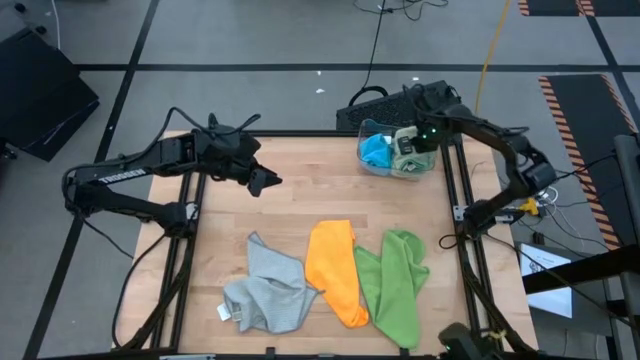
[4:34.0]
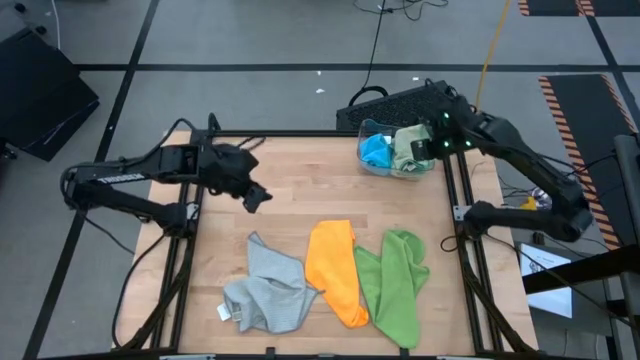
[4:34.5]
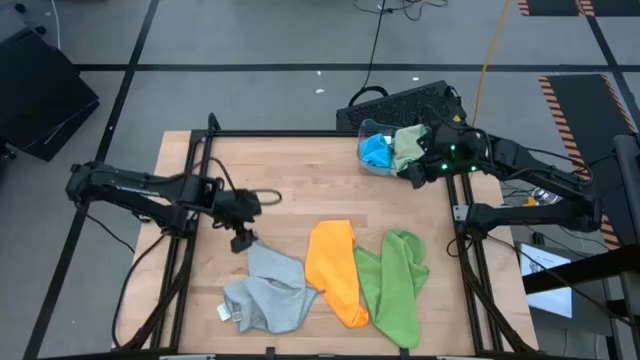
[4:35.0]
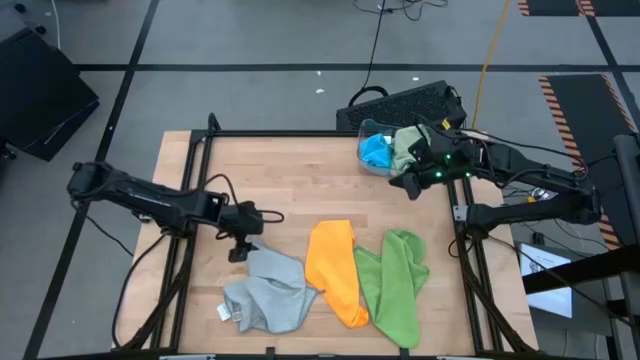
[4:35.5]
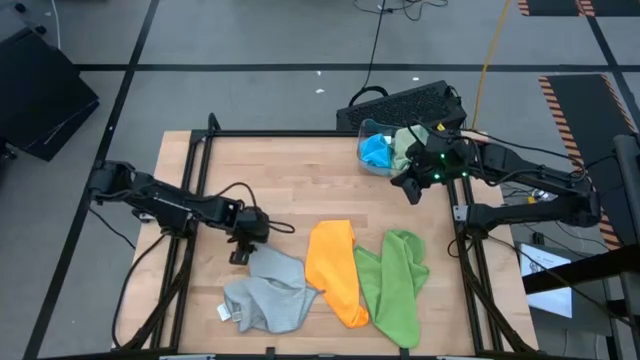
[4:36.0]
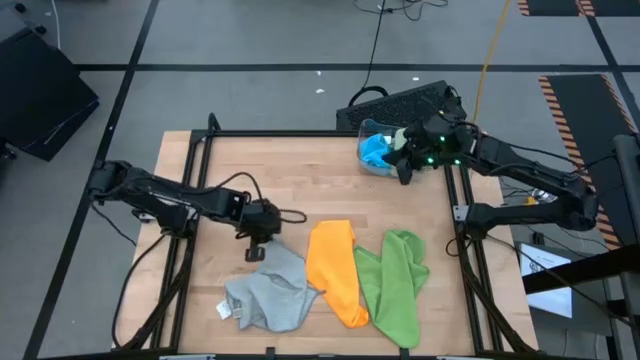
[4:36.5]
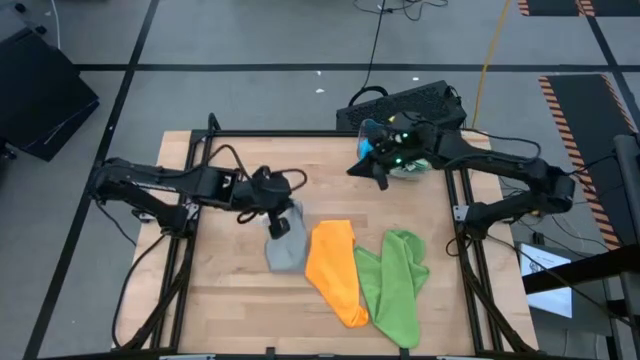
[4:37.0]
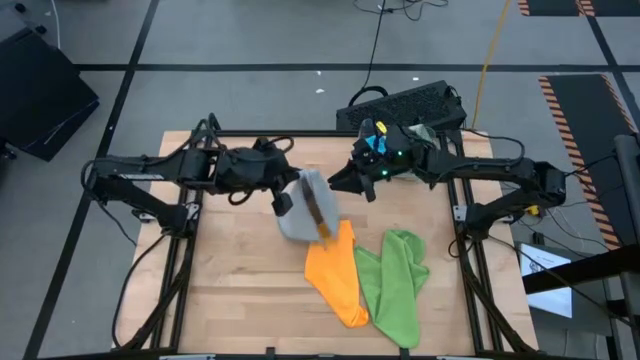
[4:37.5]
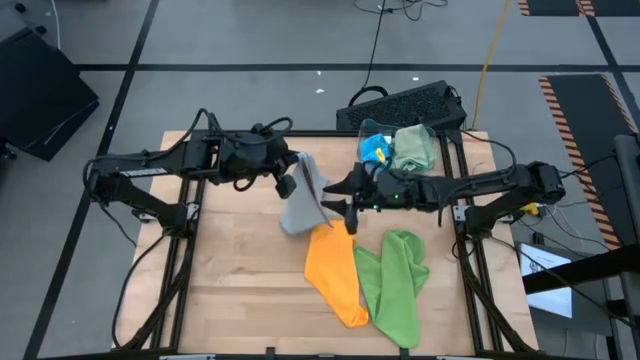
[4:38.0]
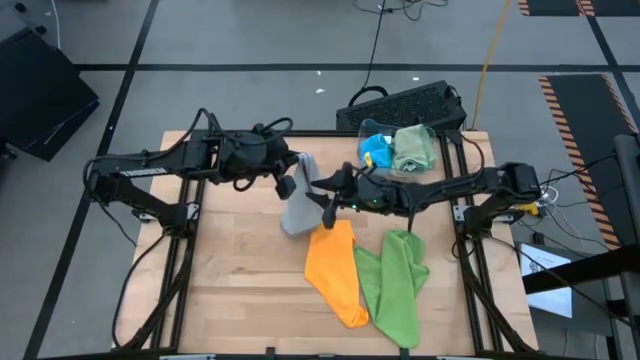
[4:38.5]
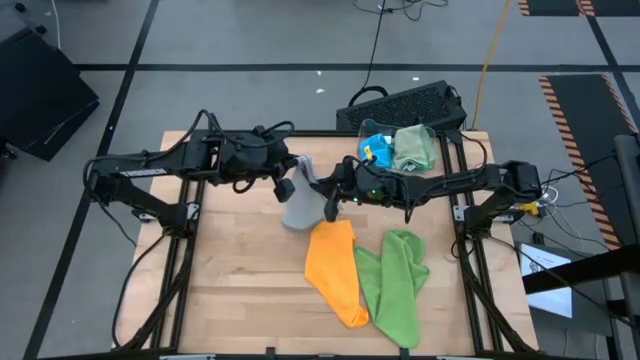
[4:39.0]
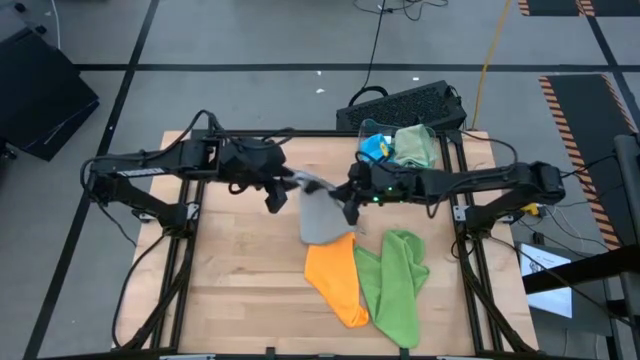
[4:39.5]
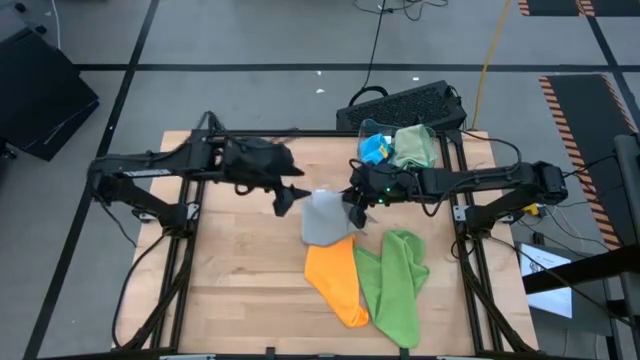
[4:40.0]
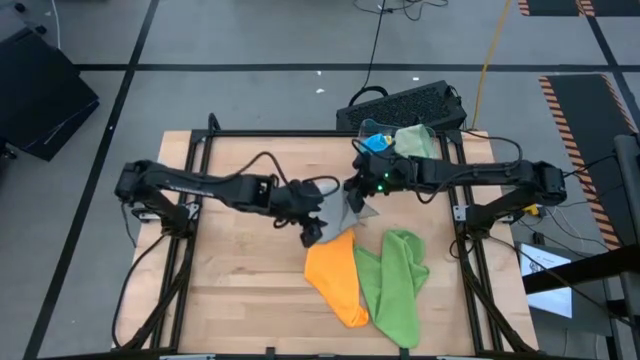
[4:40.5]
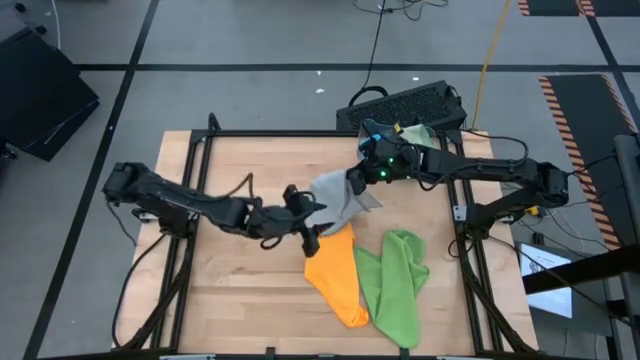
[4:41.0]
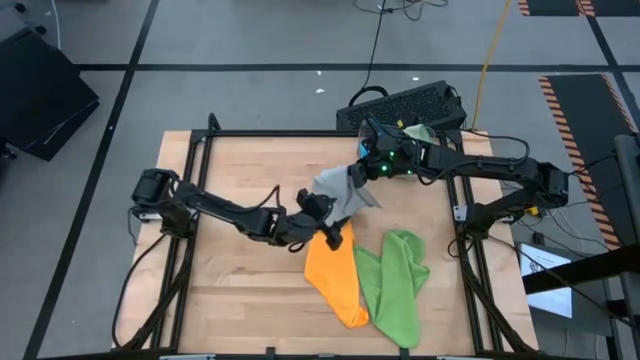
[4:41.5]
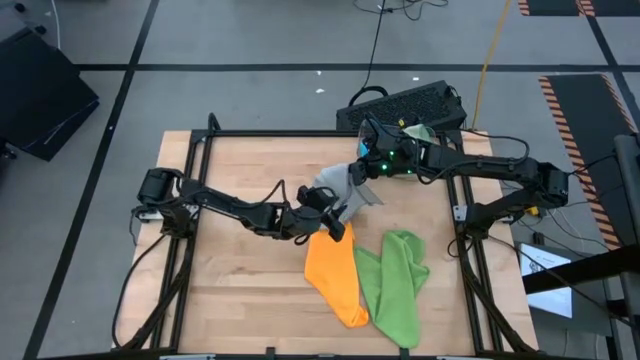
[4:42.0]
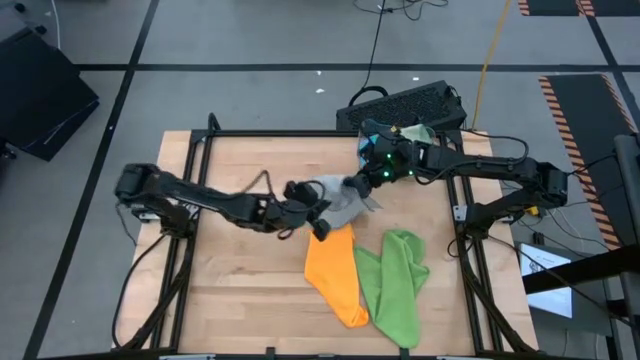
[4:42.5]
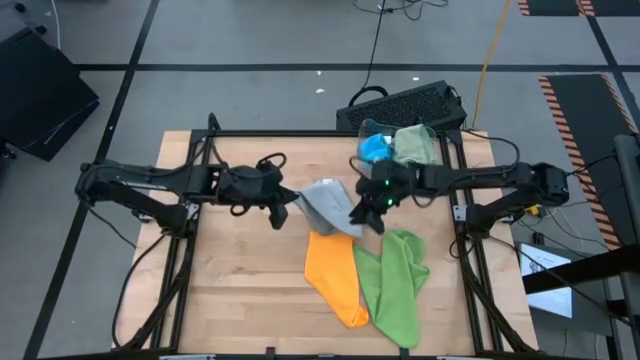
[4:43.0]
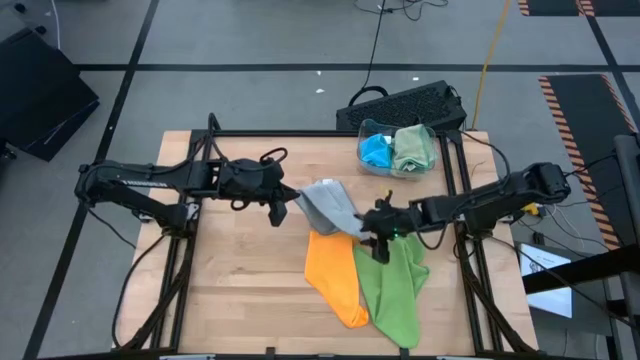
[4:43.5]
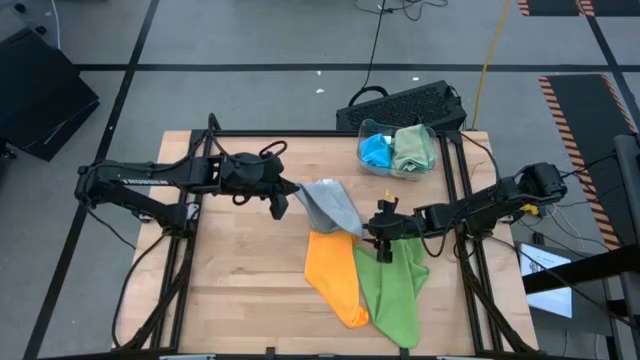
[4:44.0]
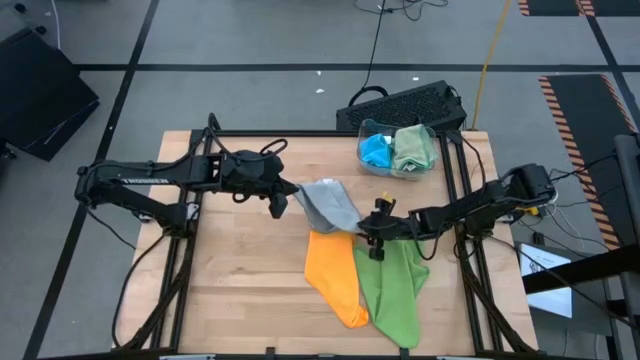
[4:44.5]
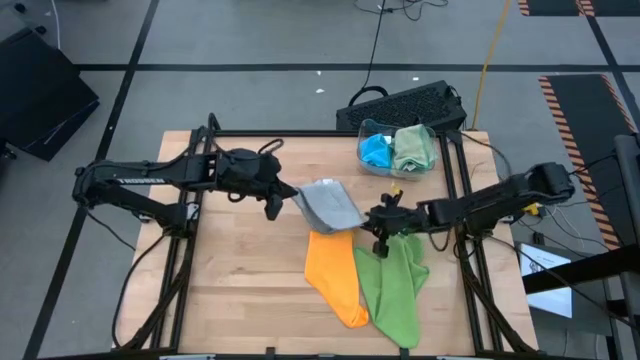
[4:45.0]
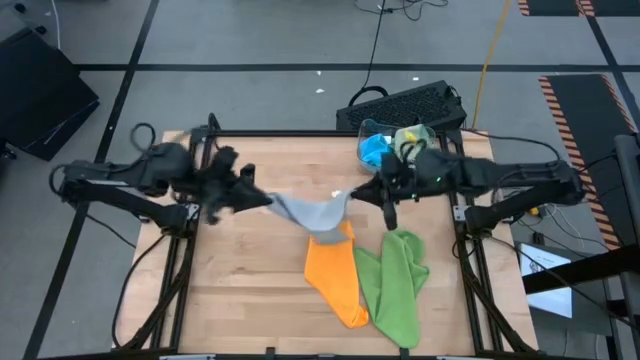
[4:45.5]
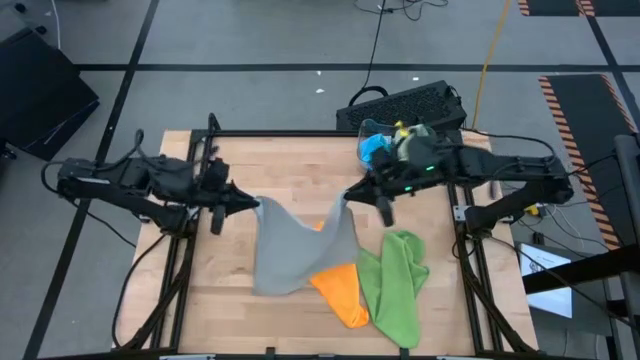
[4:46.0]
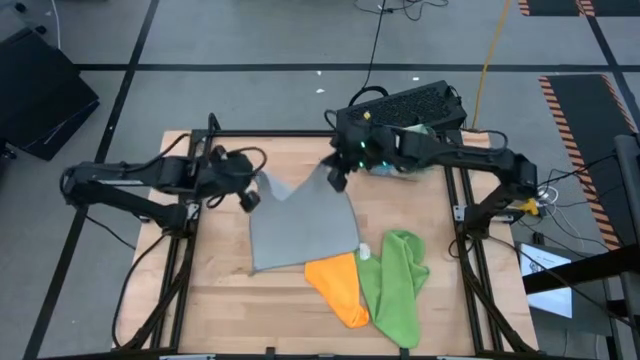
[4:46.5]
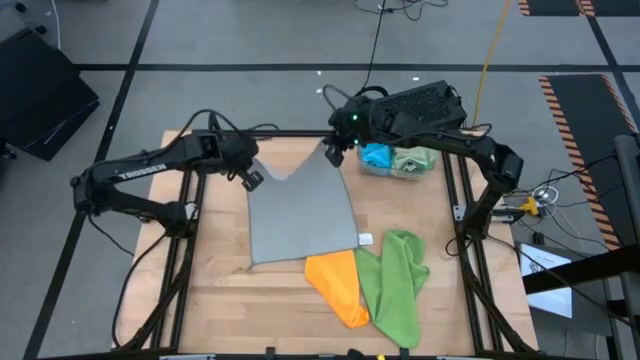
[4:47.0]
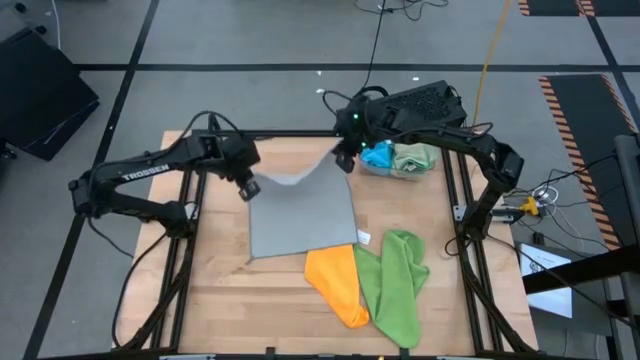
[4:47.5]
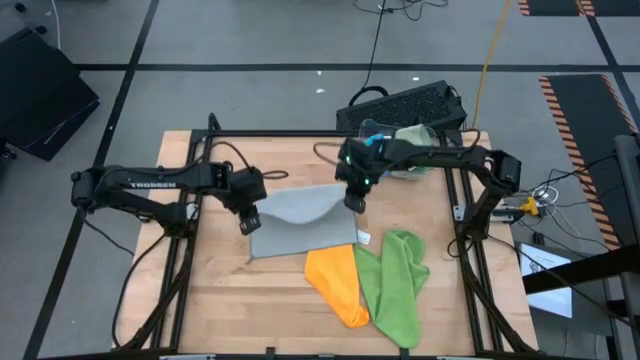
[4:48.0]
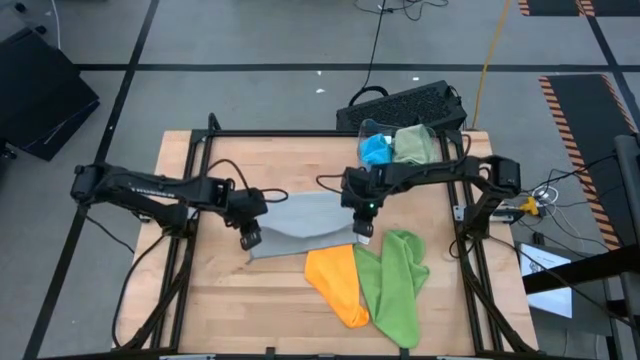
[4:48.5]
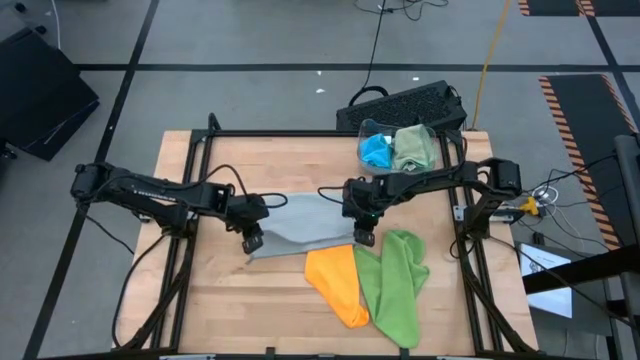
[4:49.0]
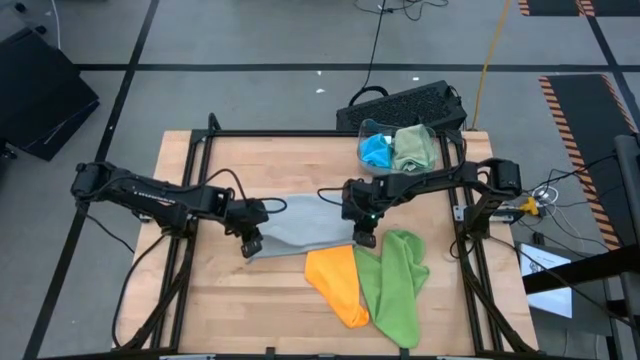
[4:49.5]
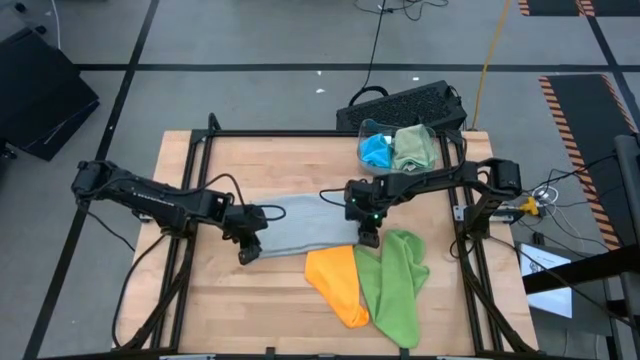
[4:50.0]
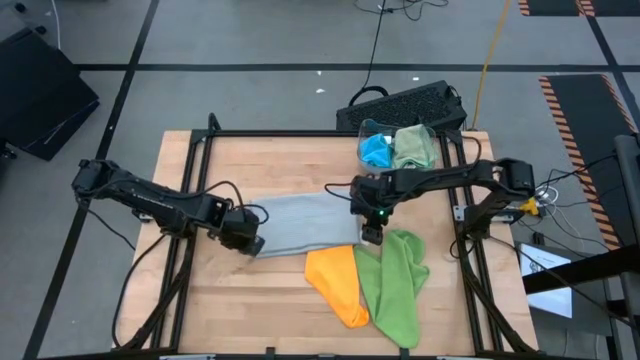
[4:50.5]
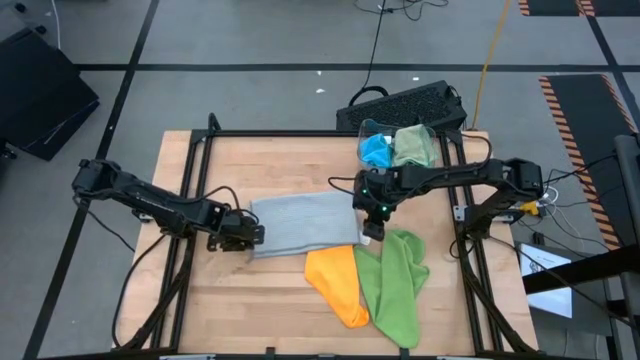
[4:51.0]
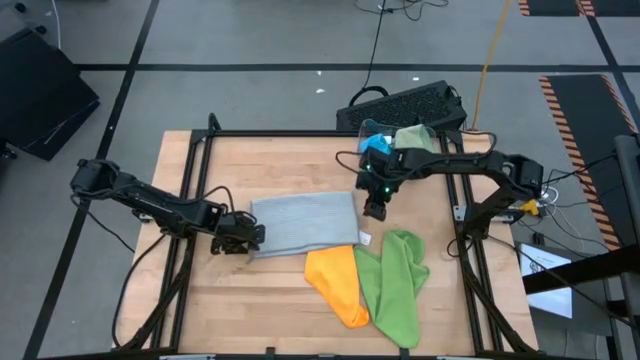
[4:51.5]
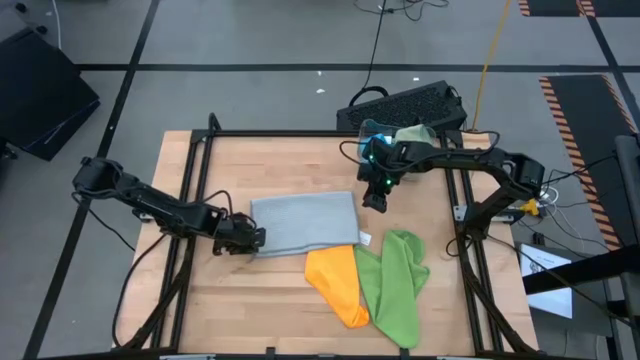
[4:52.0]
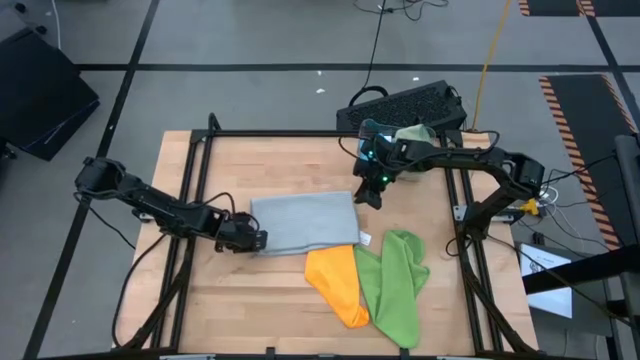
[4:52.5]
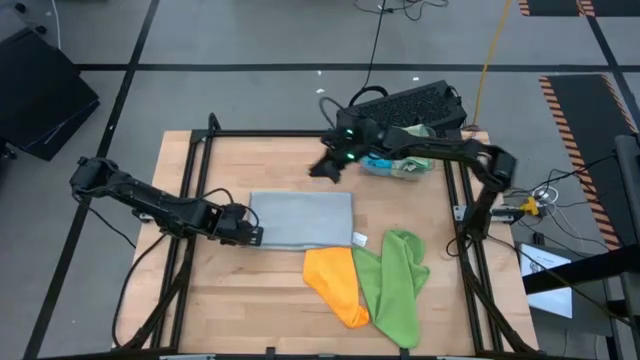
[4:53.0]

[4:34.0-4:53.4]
Task: Fold microfiber towels
Fold the gray microfiber towel
